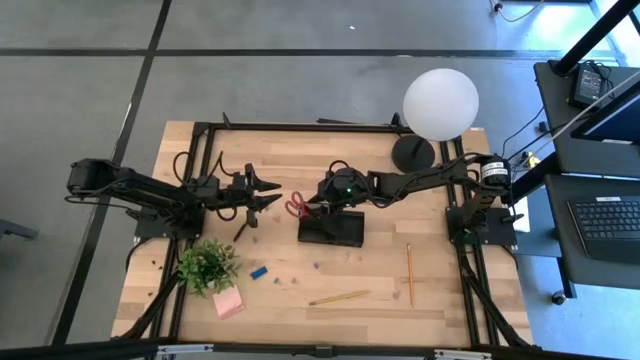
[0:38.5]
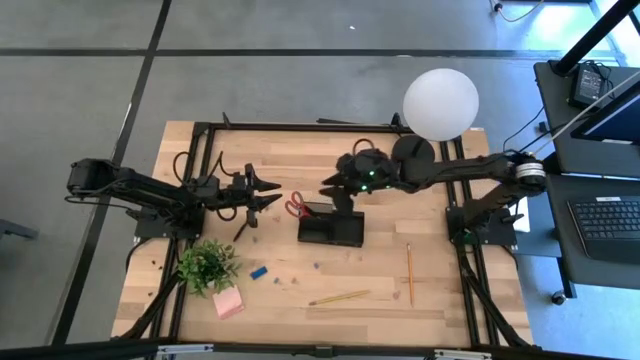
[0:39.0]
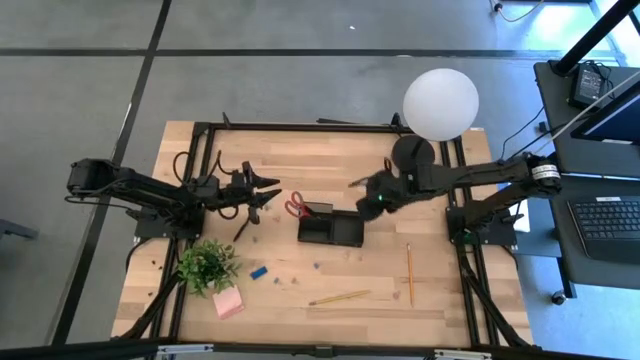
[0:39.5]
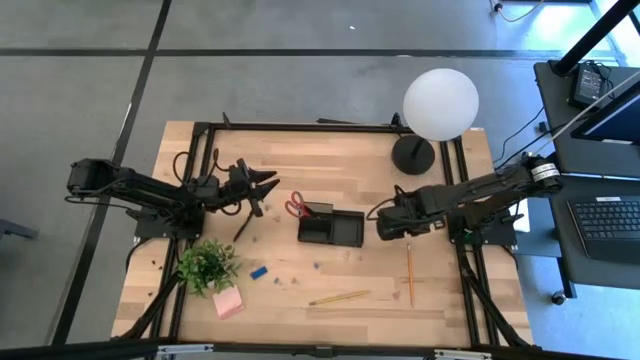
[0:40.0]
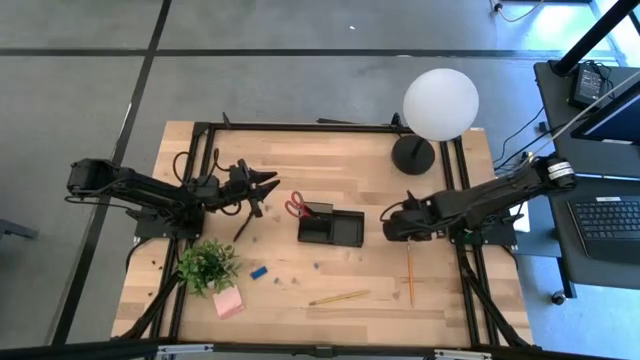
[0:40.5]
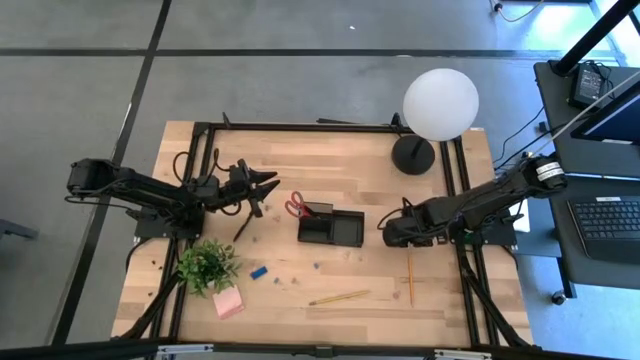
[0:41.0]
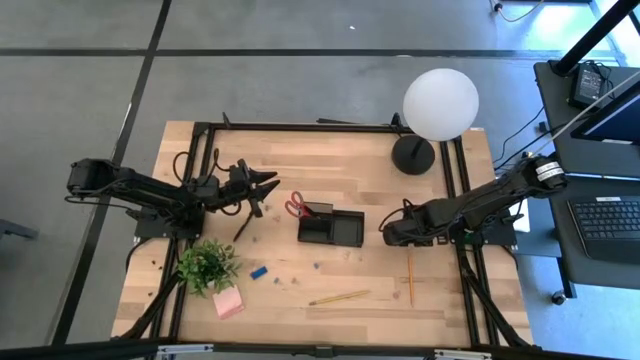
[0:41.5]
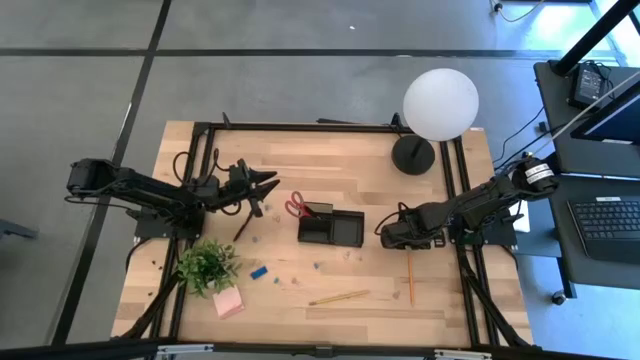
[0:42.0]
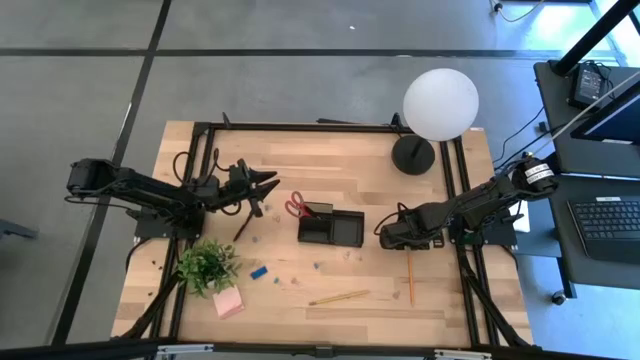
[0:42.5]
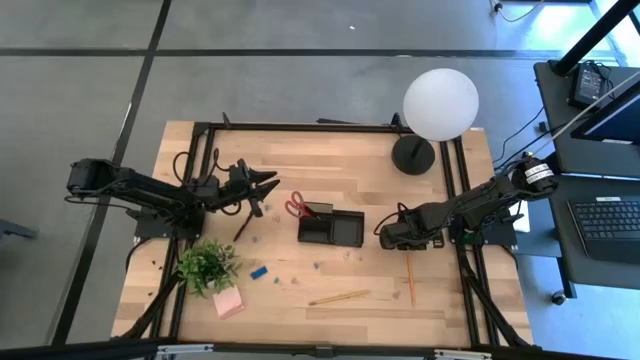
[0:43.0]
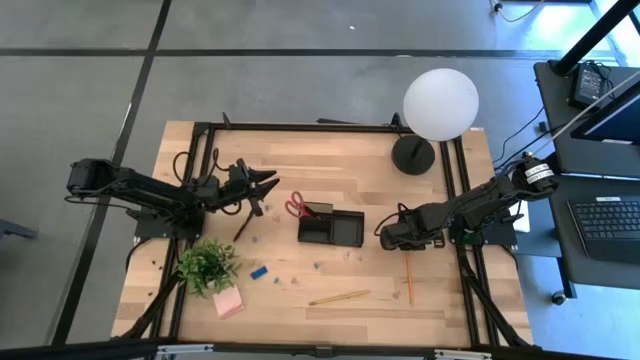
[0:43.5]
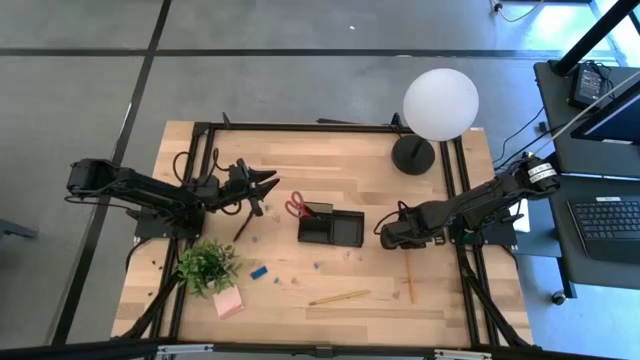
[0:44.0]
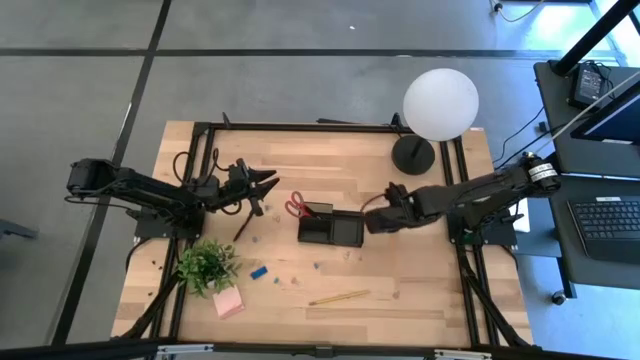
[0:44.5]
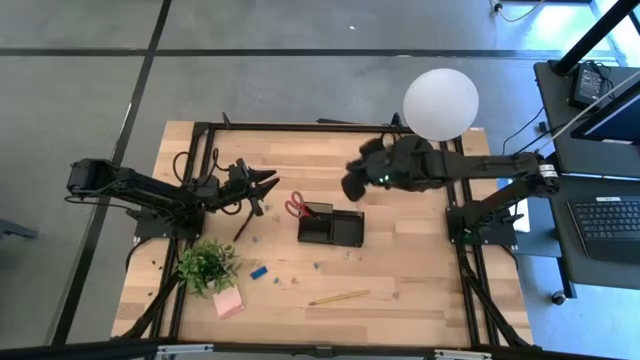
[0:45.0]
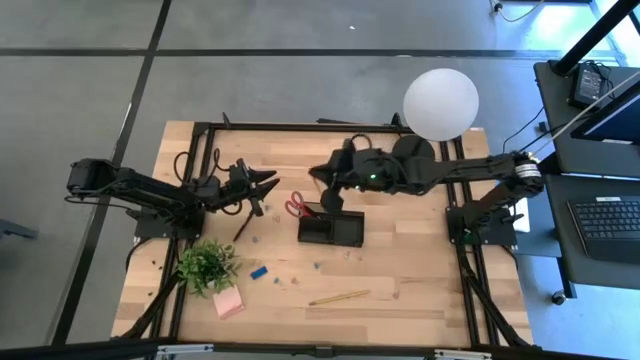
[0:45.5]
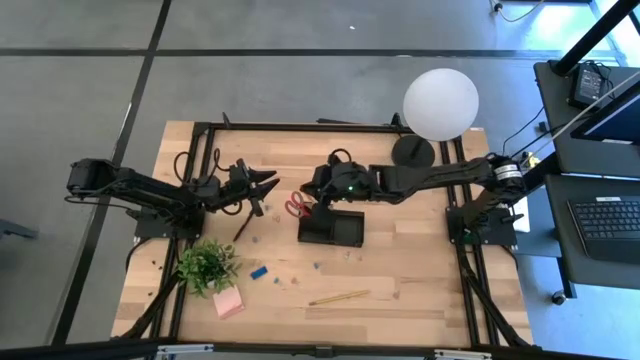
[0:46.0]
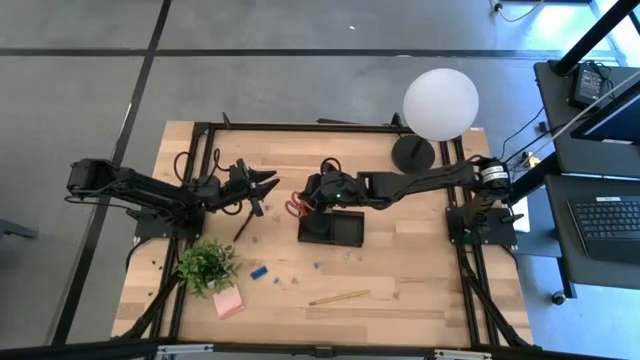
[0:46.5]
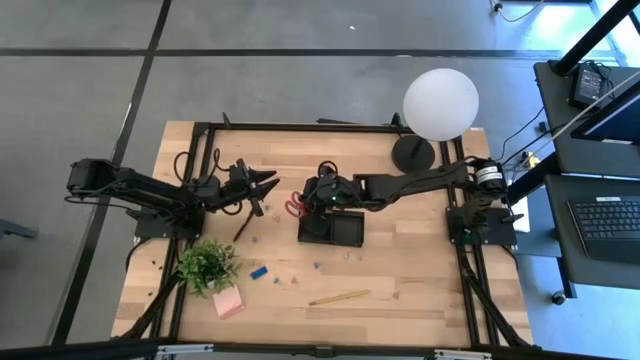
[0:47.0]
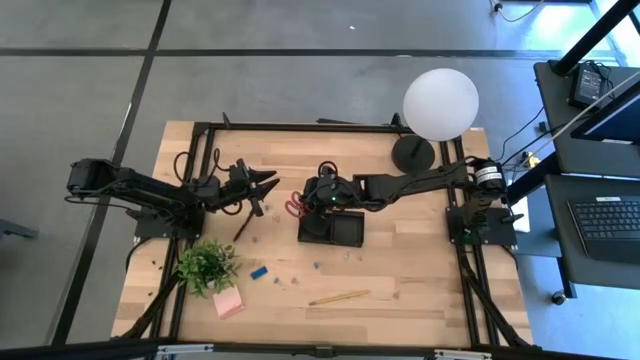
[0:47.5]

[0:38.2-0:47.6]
Task: Pick and place office supplies into organizer
Put the yellow pencil into the black desk organizer

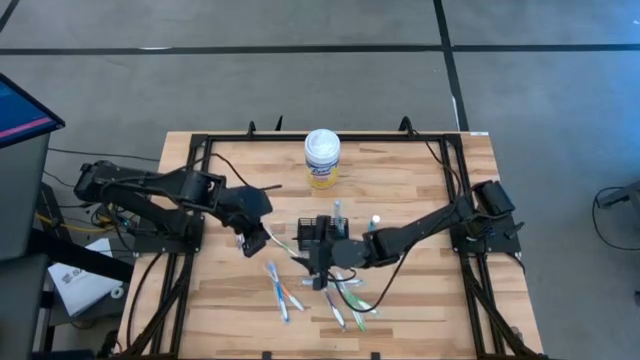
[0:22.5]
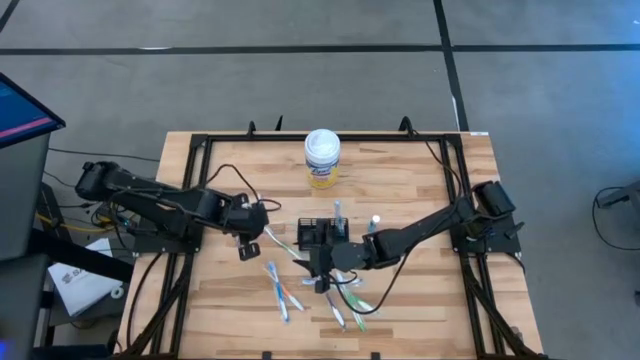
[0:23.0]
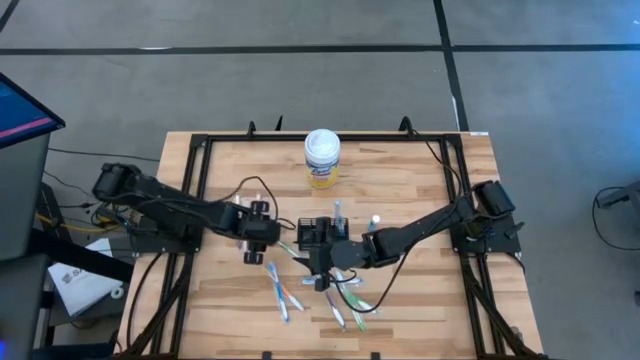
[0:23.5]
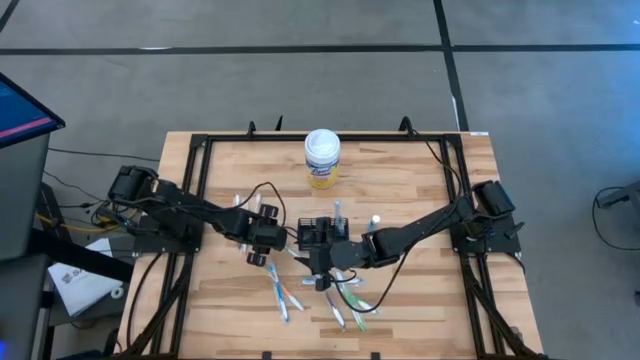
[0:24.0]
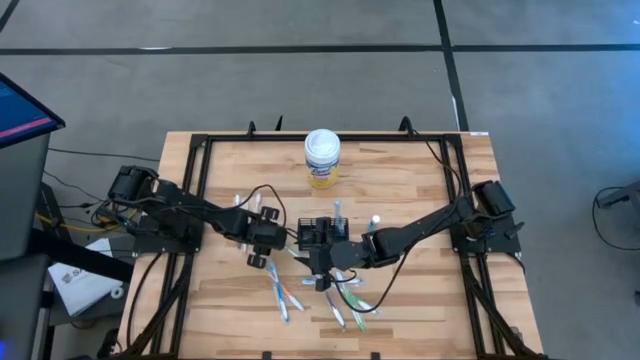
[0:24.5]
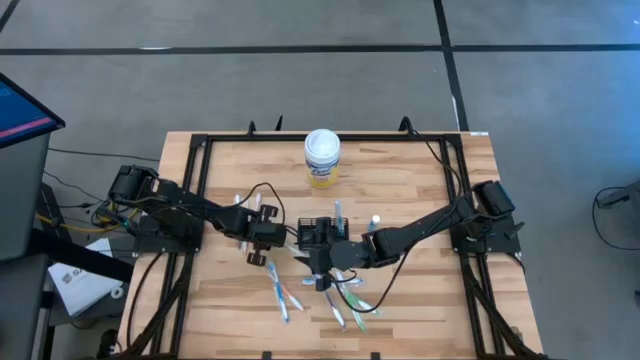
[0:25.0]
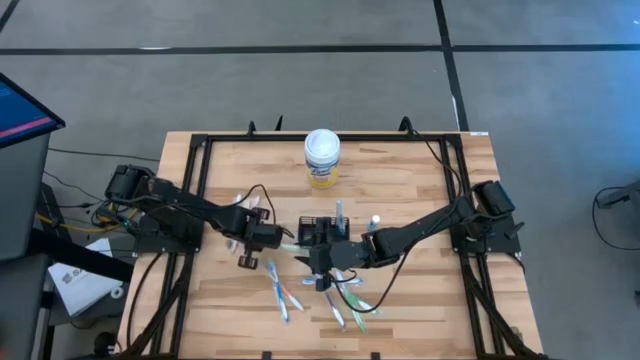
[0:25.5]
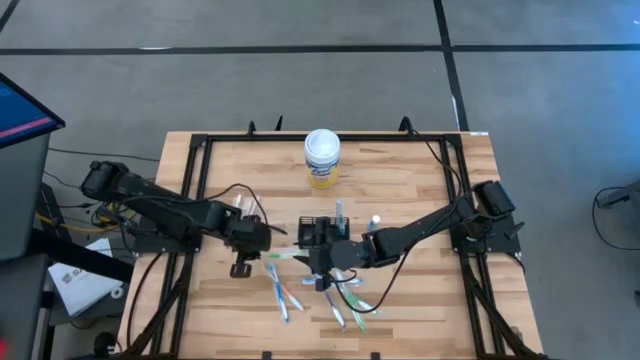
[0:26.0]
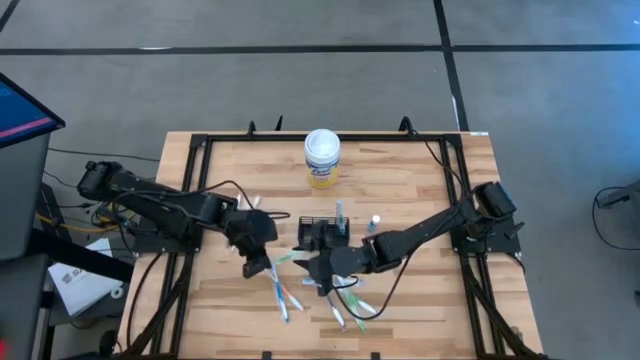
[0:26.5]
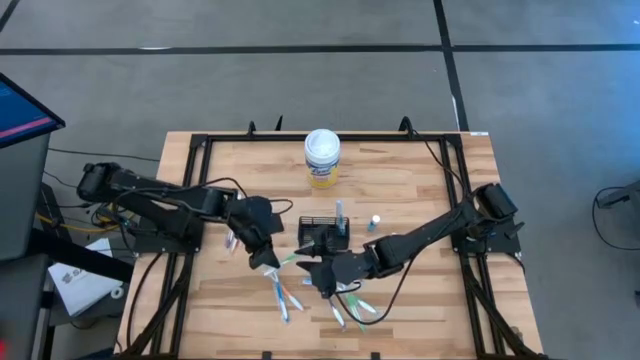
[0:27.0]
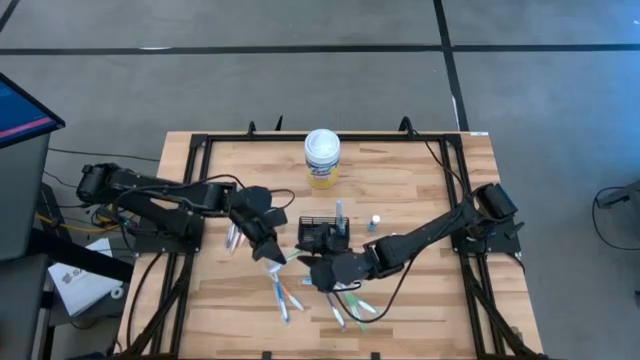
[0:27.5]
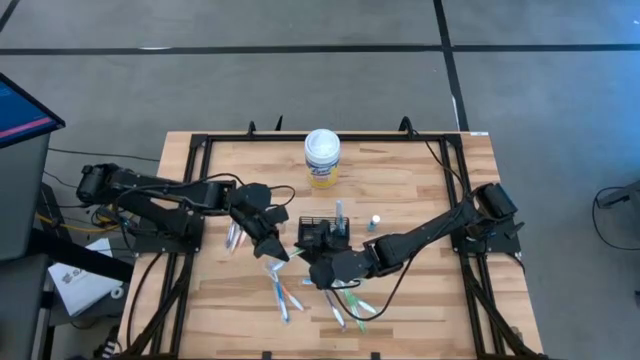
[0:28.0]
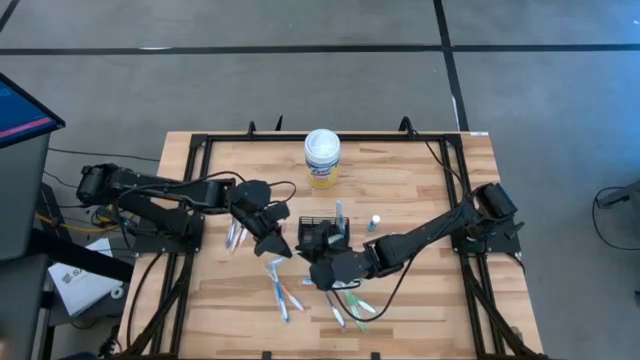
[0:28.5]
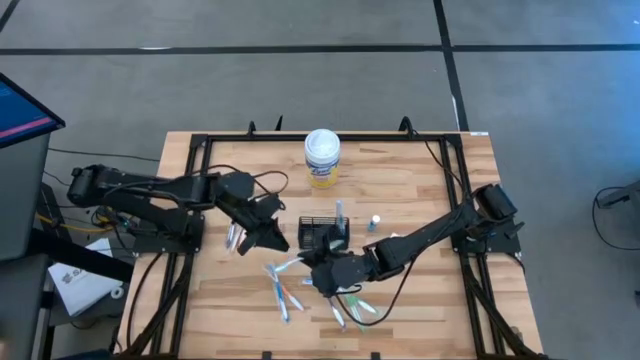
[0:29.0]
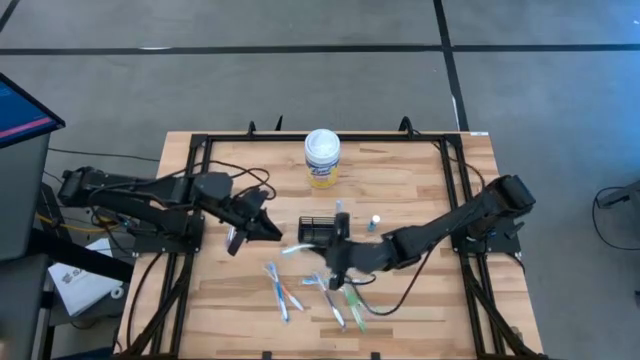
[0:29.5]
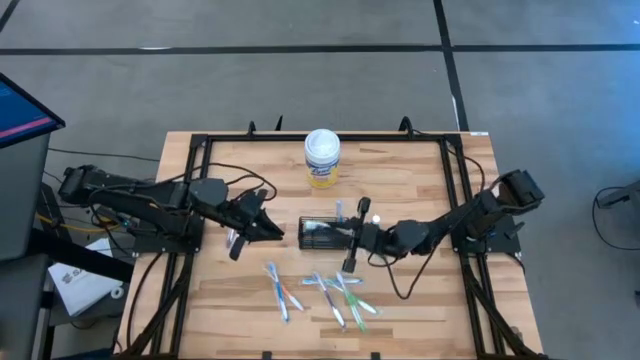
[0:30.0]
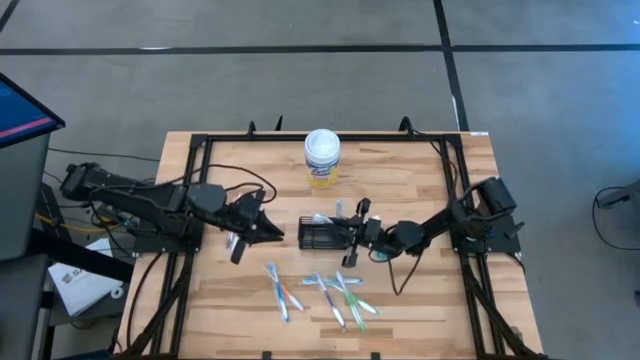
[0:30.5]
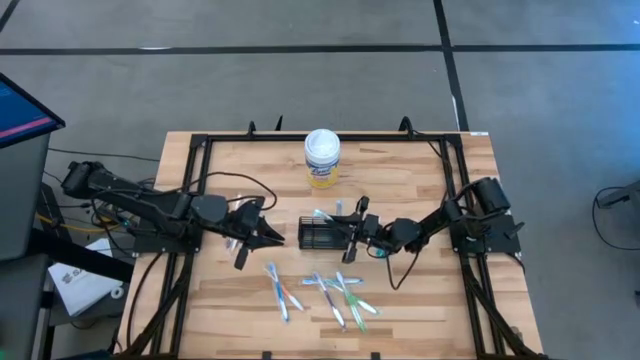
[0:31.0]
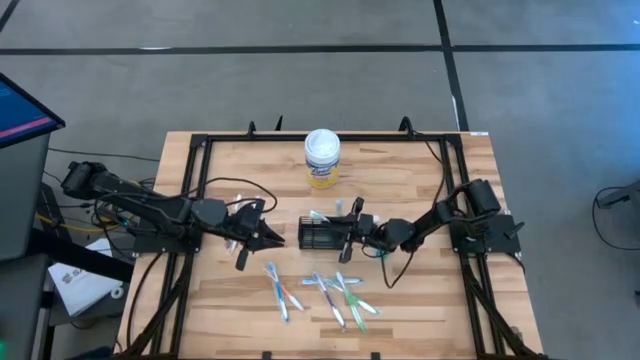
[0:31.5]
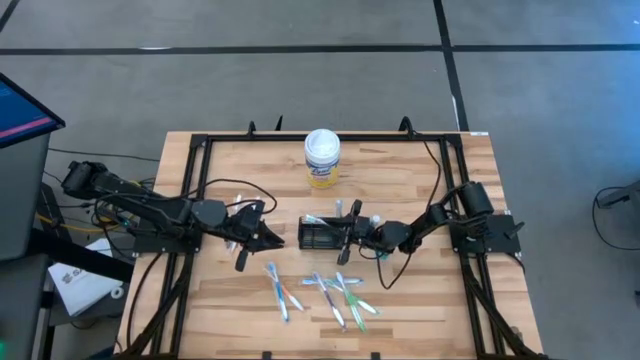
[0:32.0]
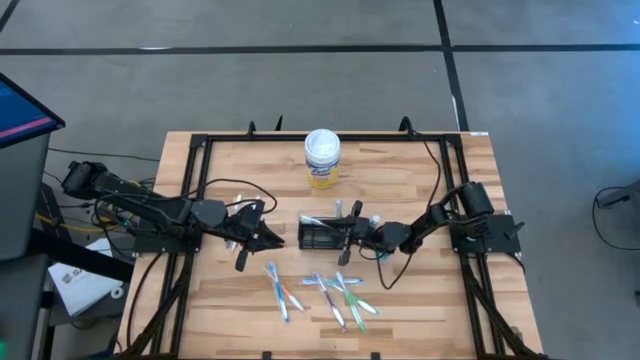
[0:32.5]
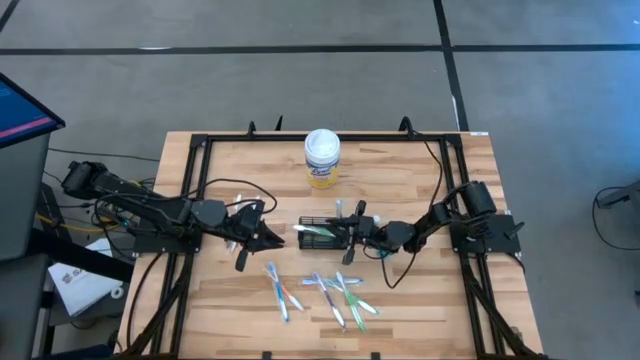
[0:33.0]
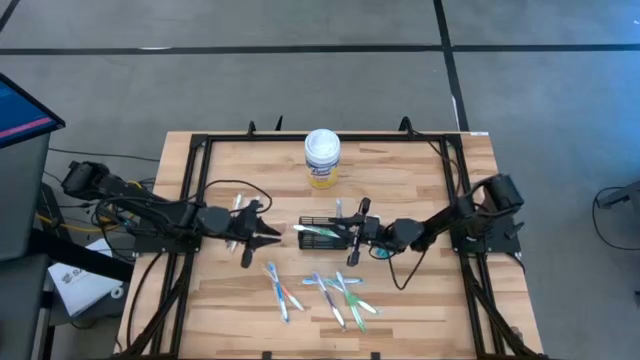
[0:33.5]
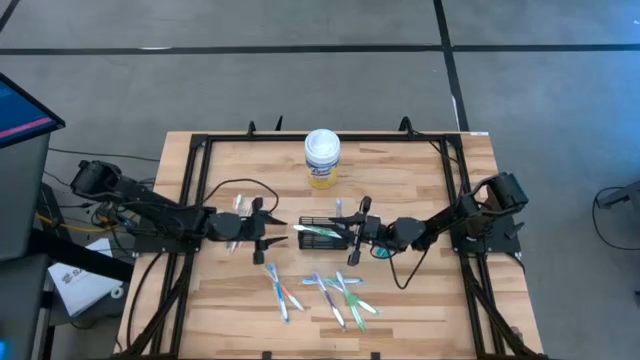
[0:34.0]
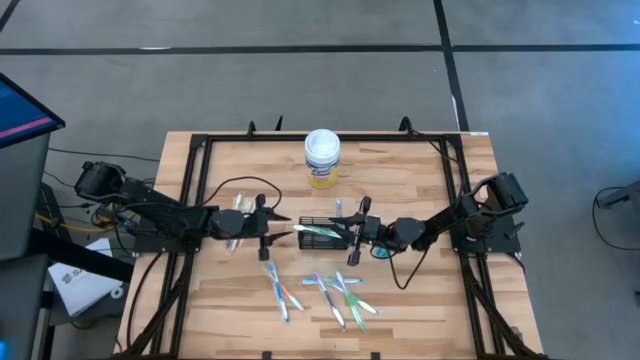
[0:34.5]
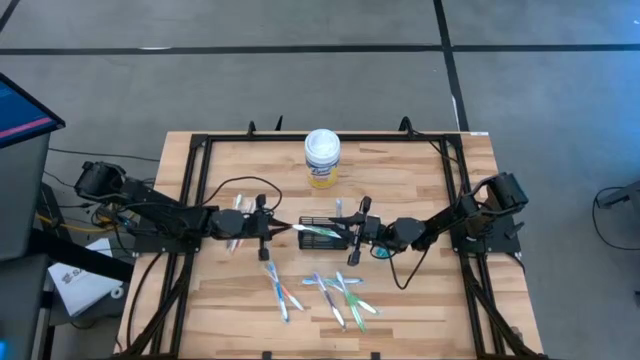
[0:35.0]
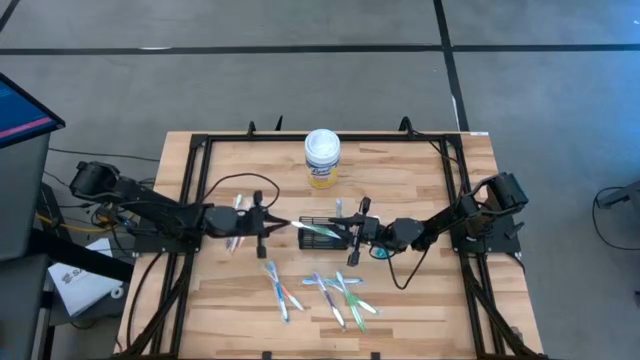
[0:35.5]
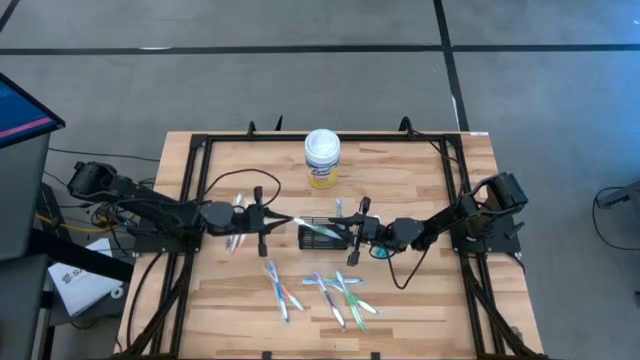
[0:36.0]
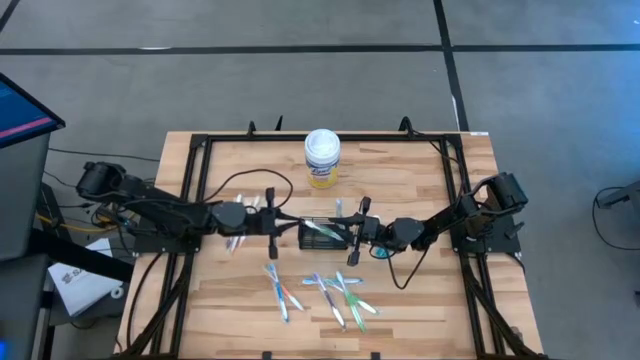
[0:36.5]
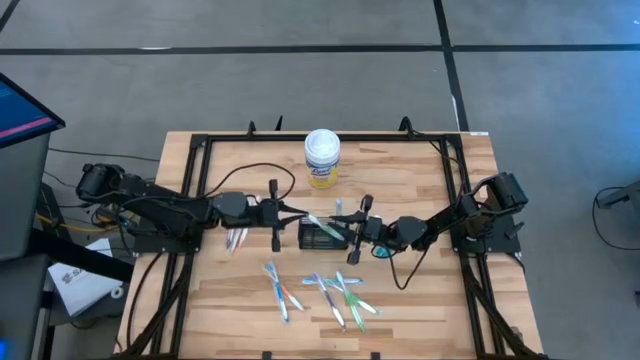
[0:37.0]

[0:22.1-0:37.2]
Task: Pick & Place toothbrushing station
Put the top right green toothbrush into the black mesh organizer
